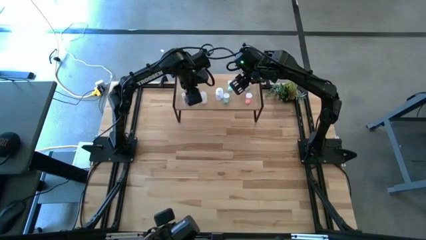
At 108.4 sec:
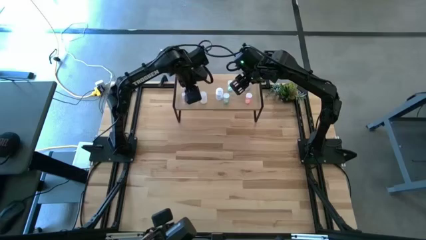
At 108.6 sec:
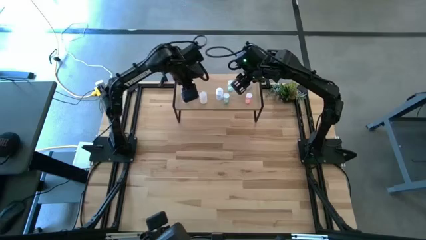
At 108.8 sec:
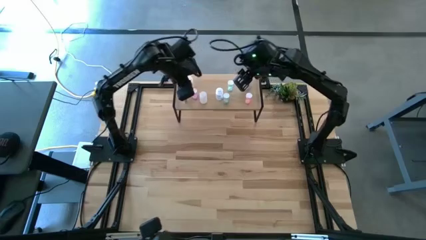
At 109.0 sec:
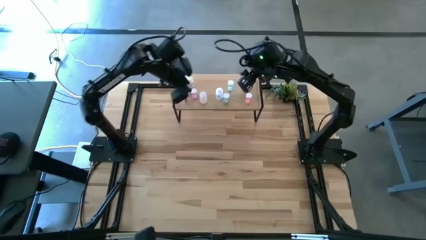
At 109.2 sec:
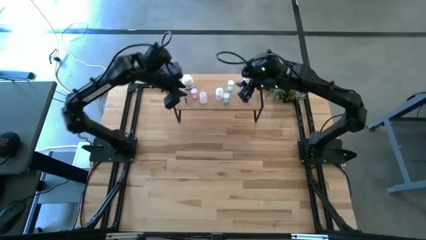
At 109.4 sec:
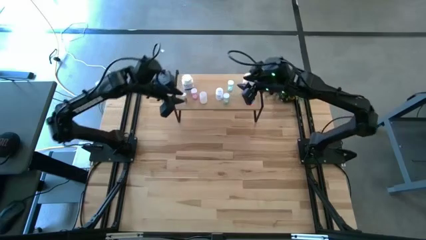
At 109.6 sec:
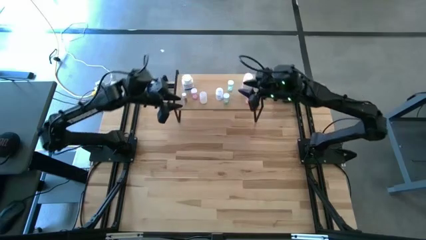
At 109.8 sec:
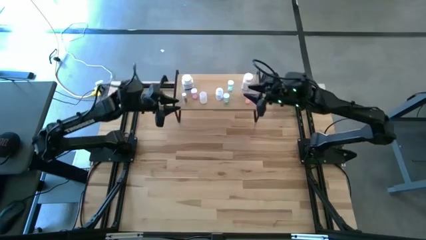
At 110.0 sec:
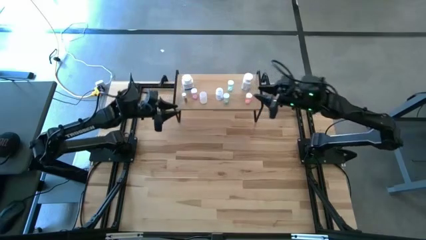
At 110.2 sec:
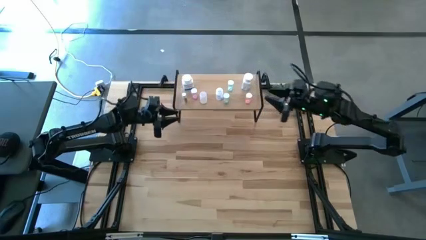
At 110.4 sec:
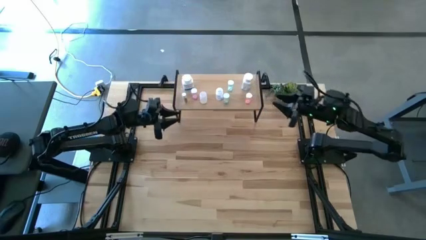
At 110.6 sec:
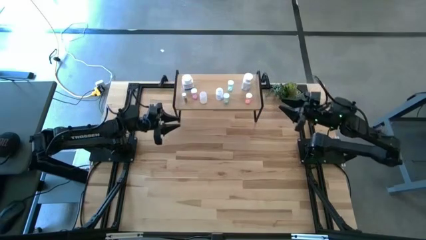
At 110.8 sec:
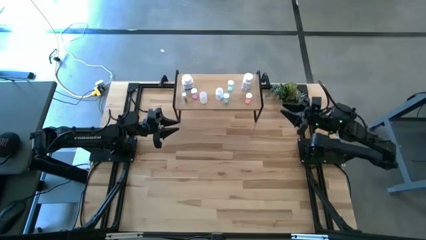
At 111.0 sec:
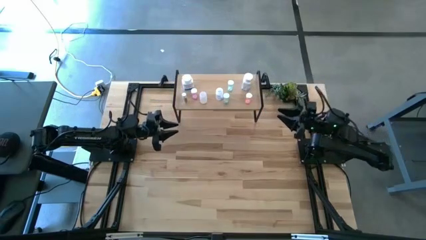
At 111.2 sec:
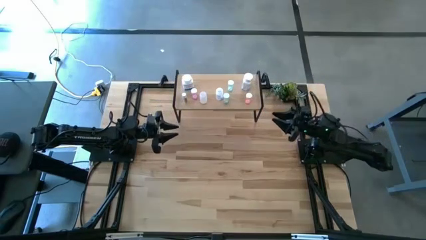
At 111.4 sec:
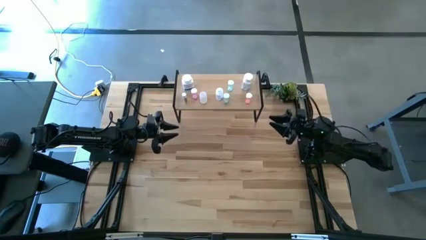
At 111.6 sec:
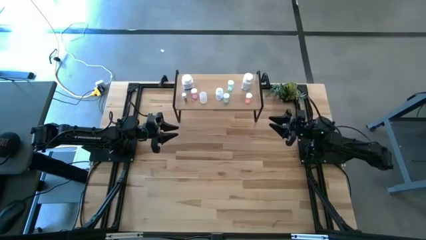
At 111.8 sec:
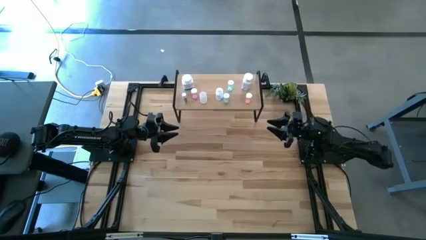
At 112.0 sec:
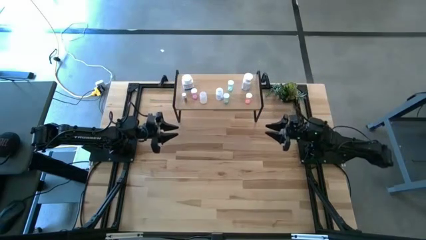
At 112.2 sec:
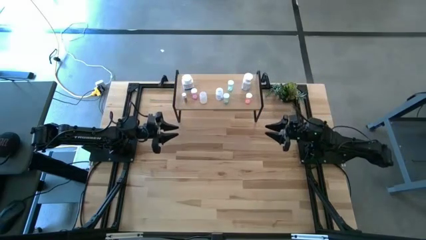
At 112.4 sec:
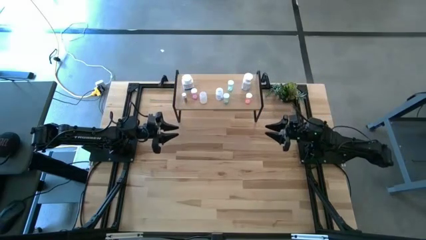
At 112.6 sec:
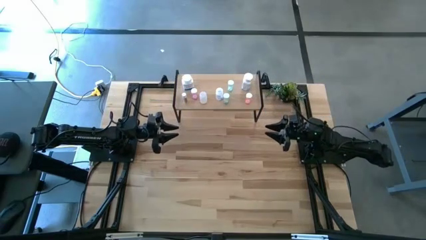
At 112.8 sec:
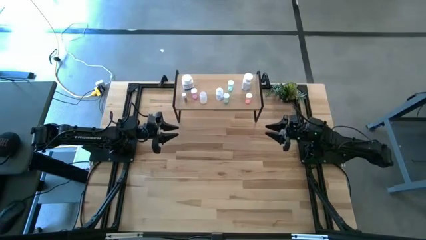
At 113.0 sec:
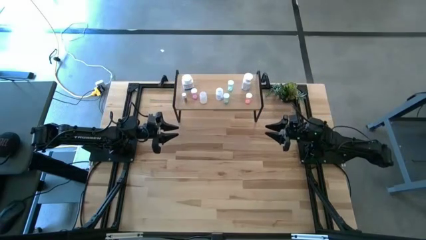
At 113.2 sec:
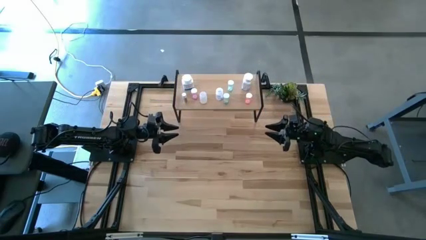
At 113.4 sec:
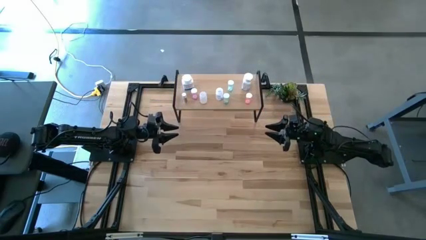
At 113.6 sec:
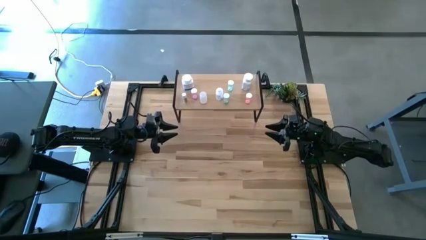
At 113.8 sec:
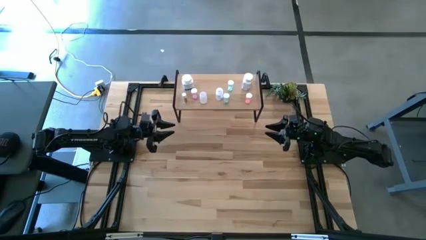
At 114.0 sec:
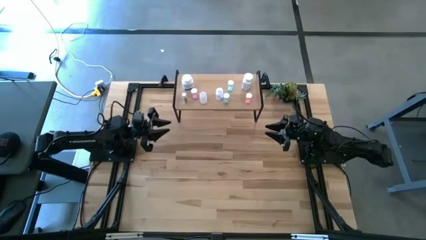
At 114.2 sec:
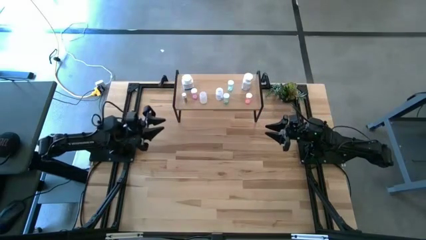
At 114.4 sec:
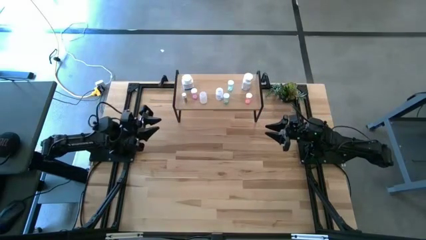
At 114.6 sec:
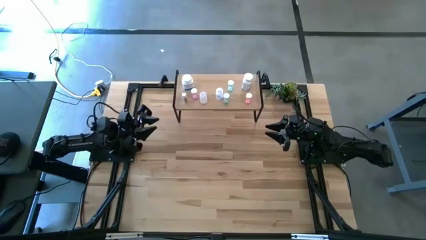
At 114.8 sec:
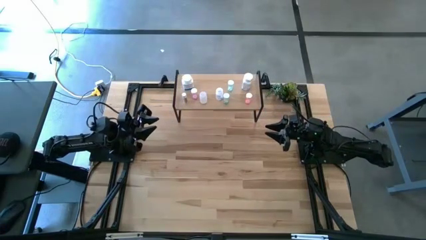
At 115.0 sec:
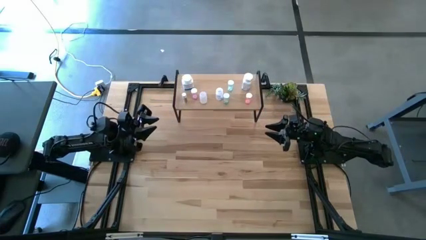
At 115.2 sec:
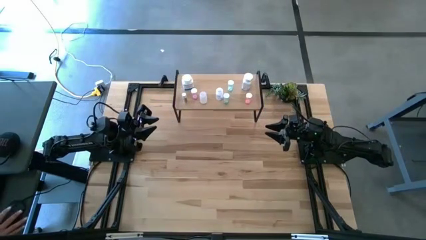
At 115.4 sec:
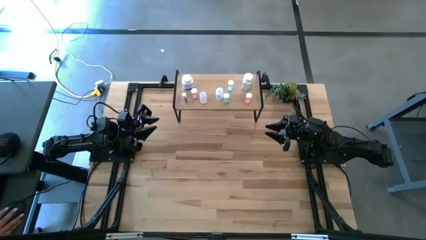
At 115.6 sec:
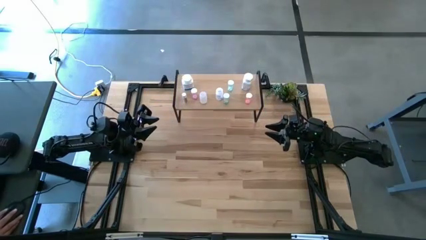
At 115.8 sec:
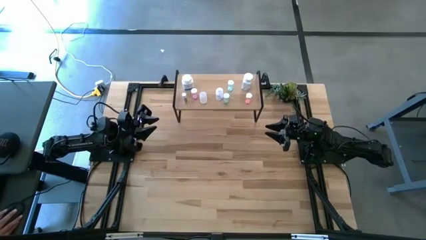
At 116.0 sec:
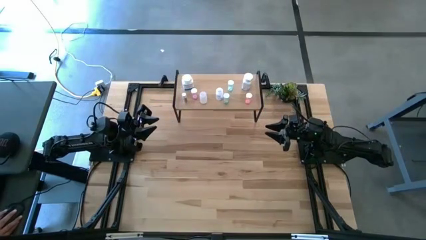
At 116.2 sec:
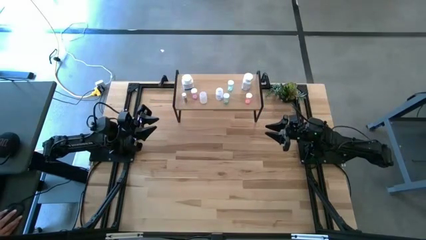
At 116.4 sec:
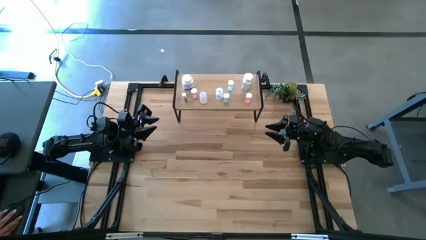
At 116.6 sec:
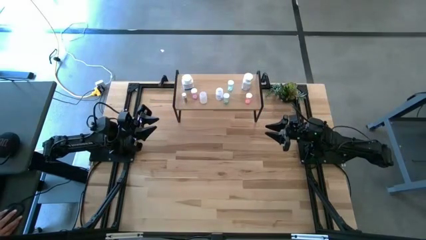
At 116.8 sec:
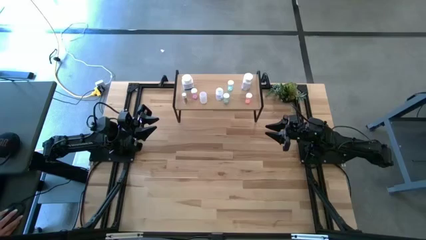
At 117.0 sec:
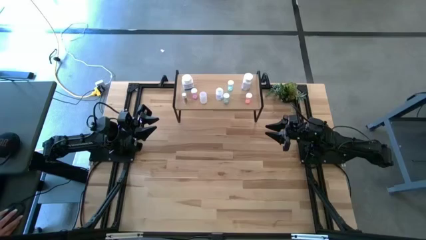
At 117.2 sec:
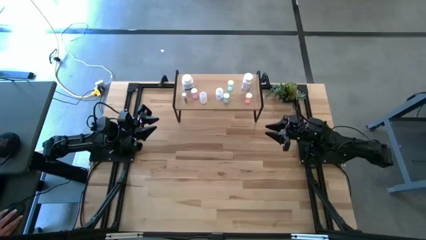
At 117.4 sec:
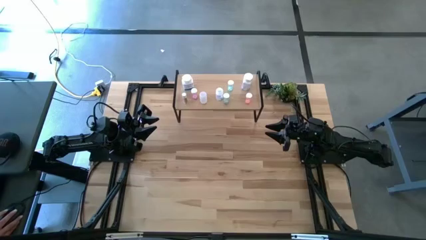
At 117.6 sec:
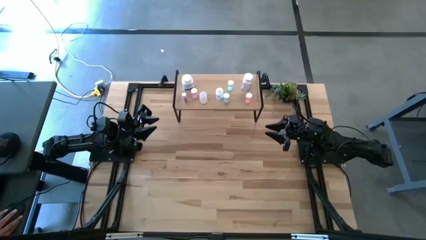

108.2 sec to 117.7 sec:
Task: Pick and place medicine bottles onto shelf by color
Return to Home Position

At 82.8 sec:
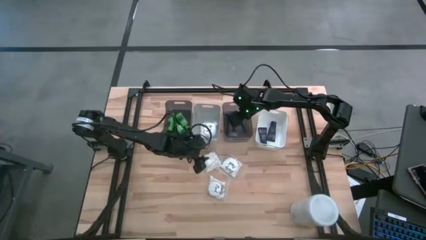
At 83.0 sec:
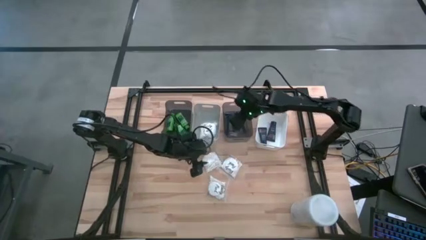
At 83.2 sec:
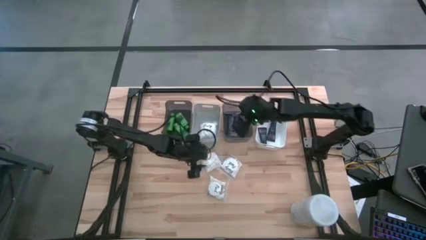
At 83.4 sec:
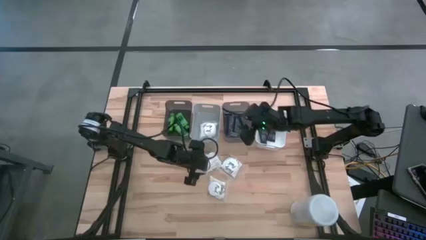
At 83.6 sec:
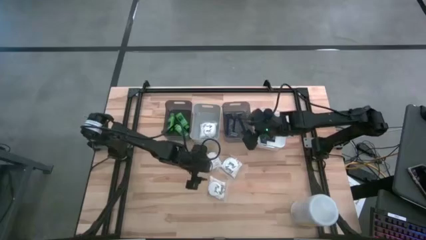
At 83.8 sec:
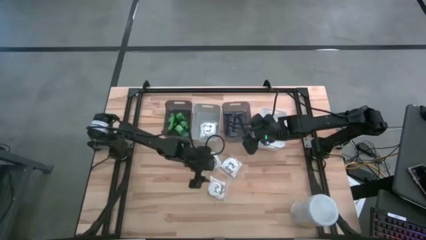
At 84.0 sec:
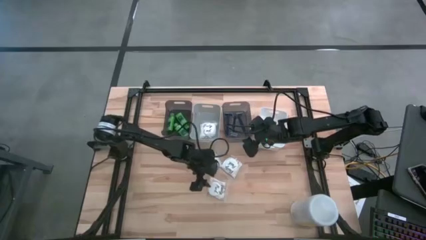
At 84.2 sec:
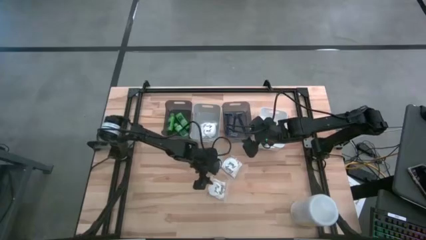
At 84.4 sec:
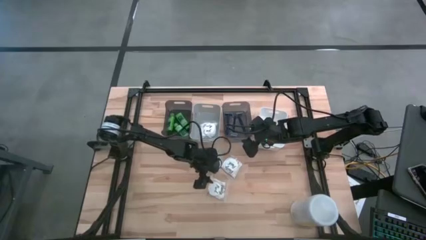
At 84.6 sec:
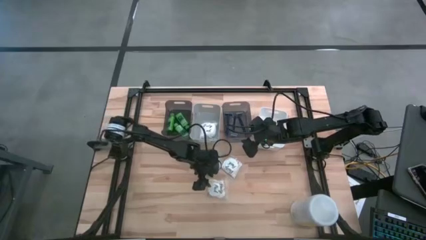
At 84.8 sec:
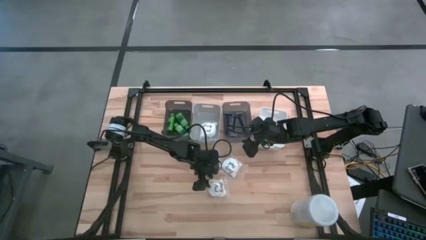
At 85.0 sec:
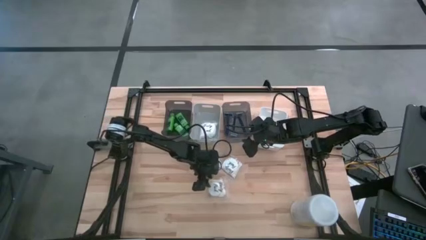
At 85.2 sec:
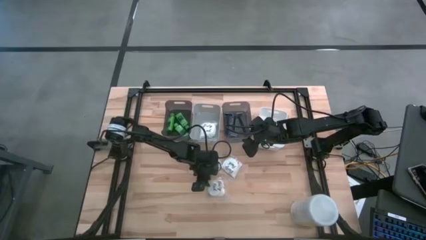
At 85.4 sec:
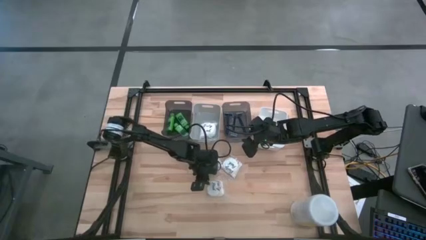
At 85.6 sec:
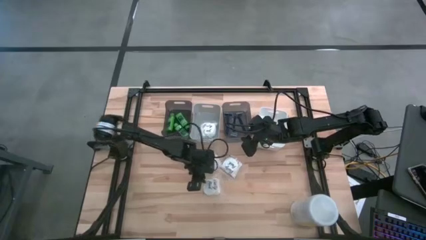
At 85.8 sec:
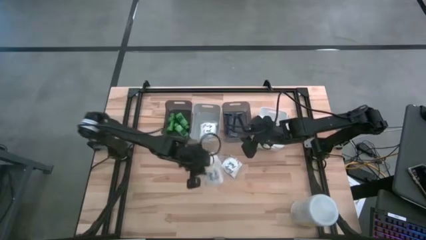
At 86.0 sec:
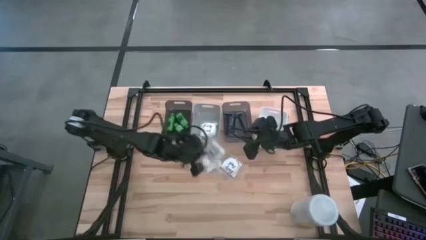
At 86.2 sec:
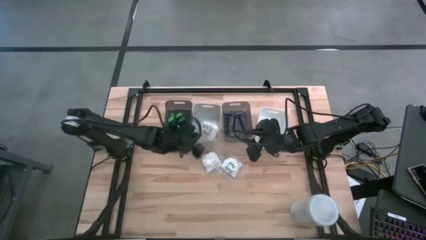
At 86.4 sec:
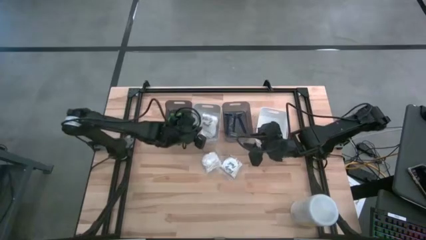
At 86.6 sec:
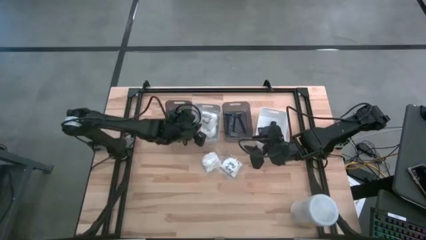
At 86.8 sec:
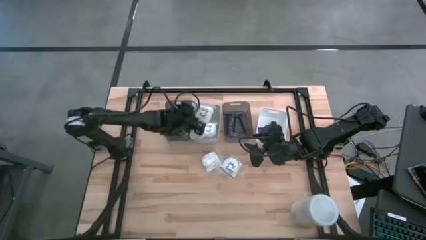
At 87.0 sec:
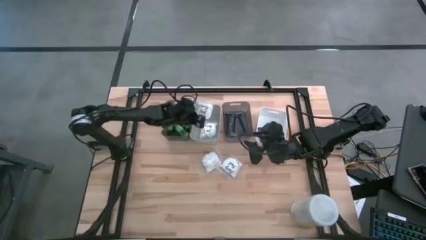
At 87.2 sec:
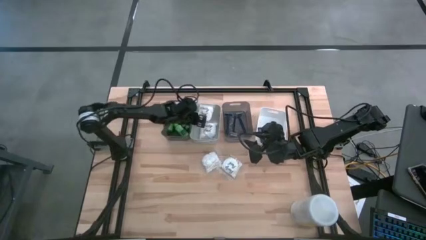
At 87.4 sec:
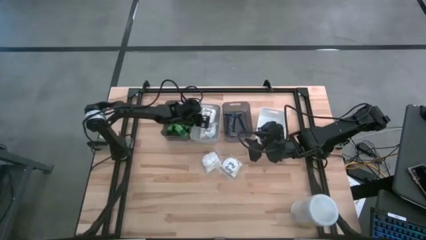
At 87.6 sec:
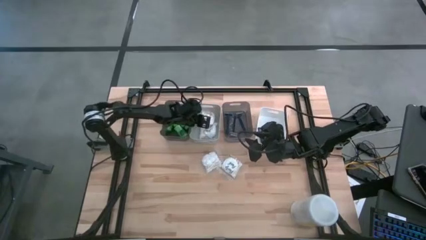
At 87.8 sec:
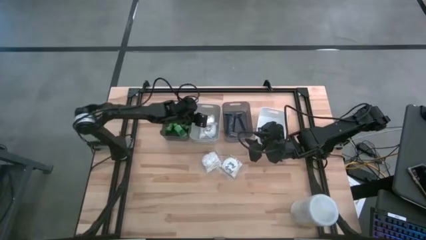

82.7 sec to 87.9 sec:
Task: Pick & Place Travel size toiletries
Put the white cotton pack into the gray bin
